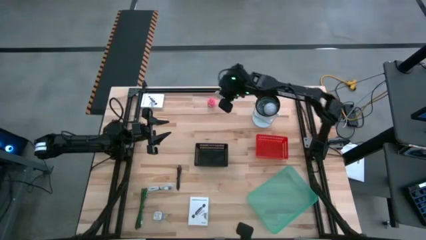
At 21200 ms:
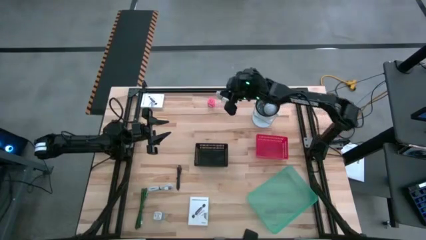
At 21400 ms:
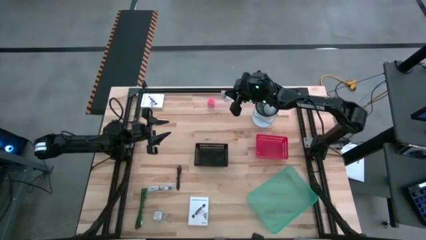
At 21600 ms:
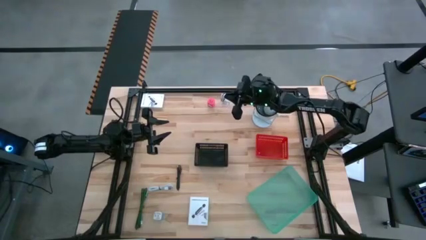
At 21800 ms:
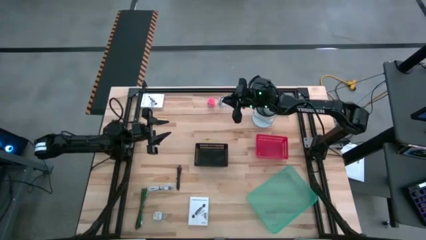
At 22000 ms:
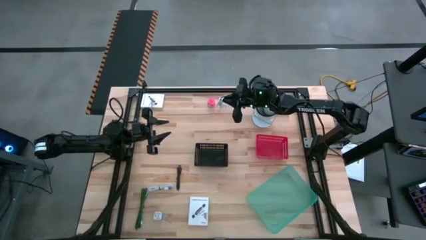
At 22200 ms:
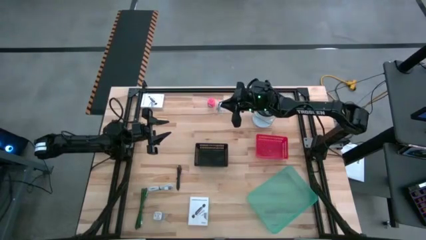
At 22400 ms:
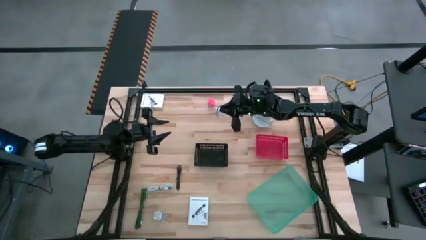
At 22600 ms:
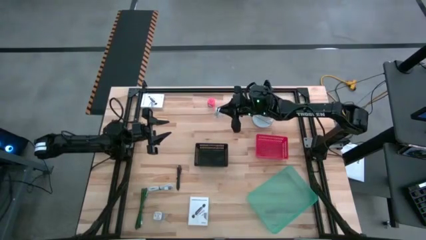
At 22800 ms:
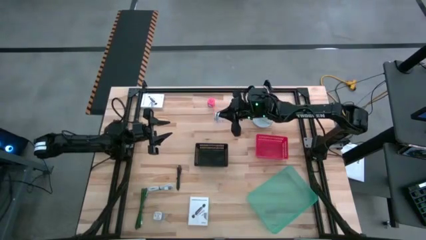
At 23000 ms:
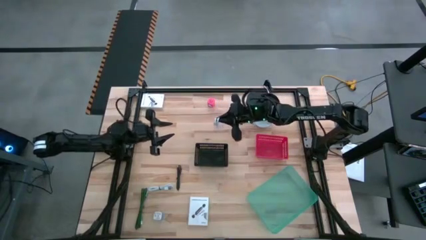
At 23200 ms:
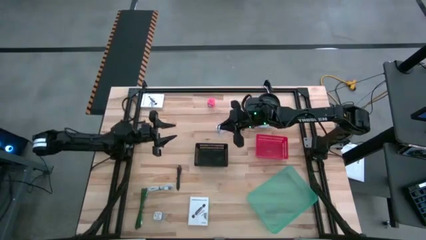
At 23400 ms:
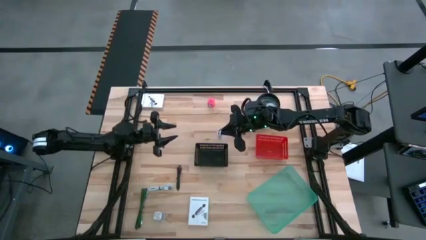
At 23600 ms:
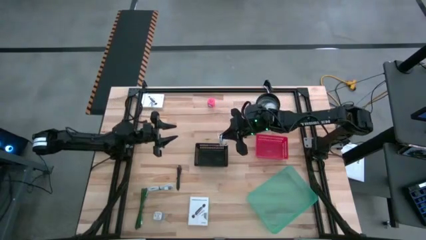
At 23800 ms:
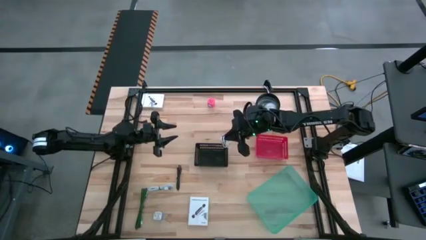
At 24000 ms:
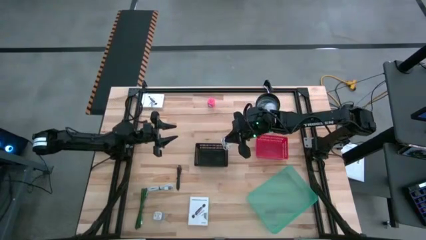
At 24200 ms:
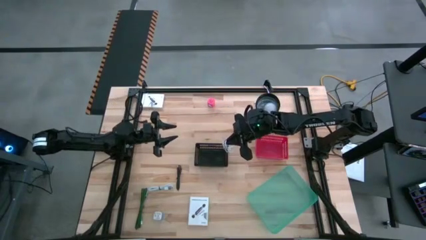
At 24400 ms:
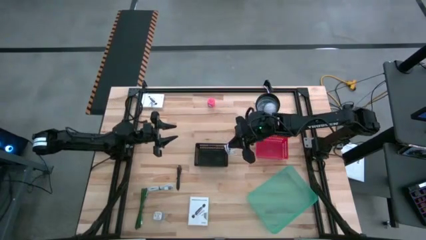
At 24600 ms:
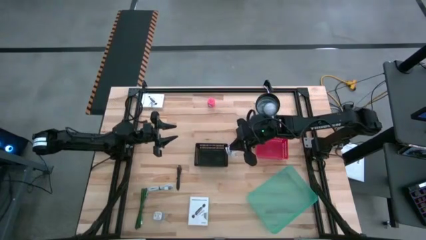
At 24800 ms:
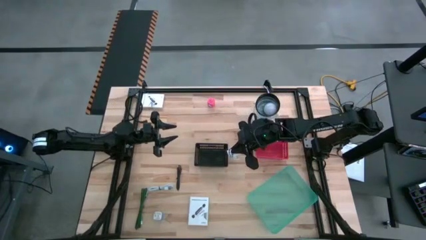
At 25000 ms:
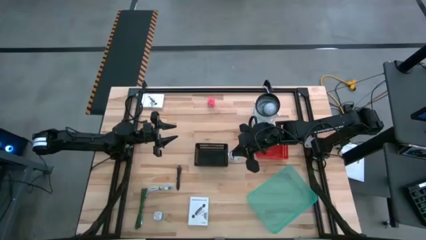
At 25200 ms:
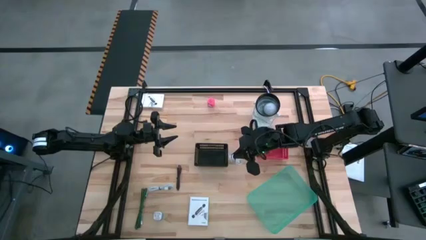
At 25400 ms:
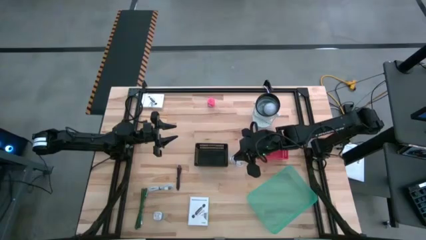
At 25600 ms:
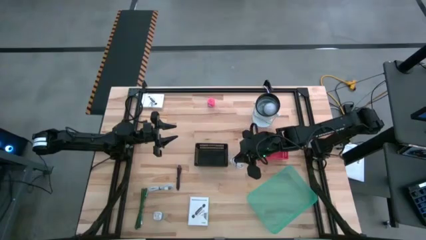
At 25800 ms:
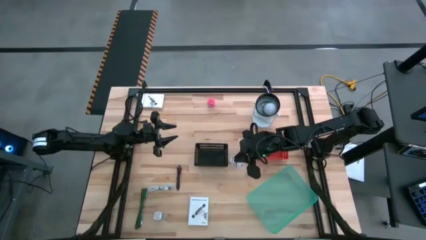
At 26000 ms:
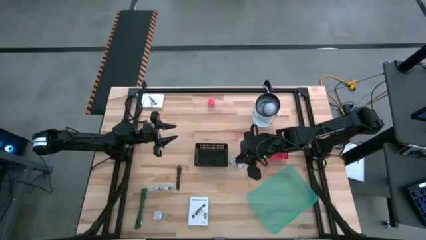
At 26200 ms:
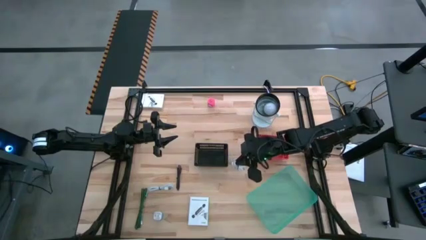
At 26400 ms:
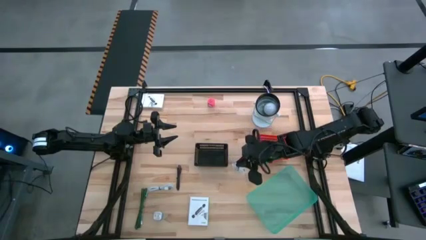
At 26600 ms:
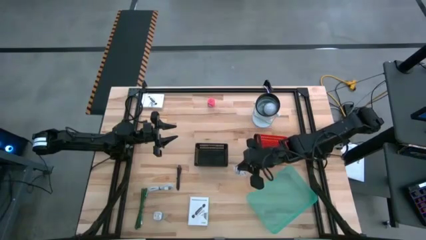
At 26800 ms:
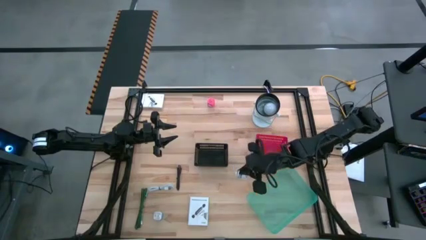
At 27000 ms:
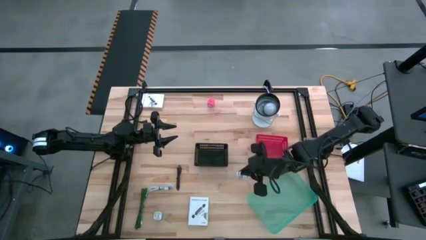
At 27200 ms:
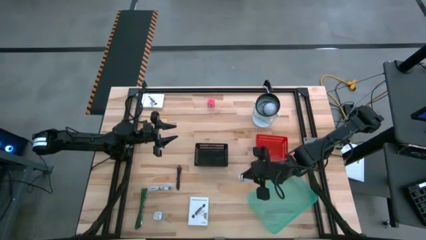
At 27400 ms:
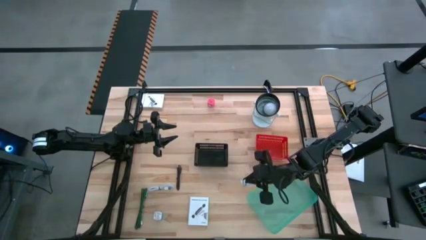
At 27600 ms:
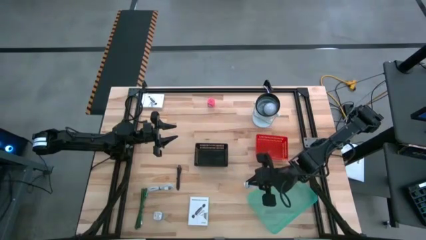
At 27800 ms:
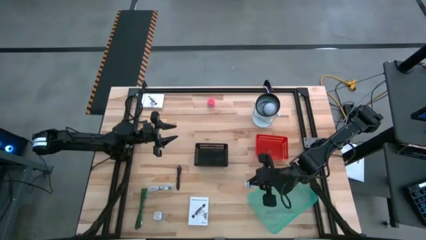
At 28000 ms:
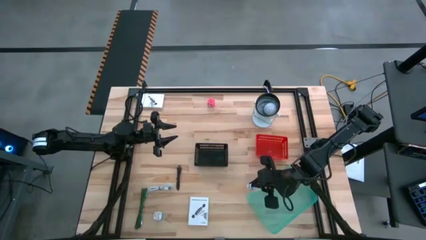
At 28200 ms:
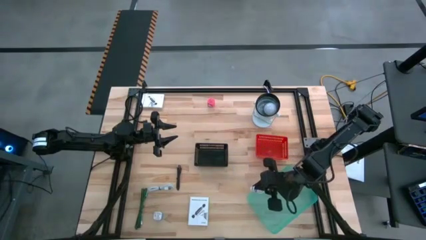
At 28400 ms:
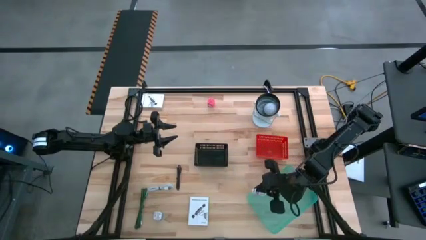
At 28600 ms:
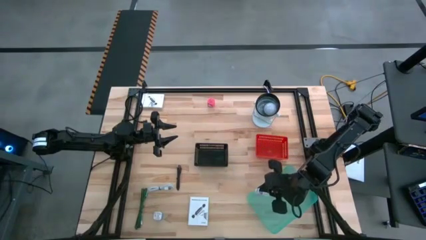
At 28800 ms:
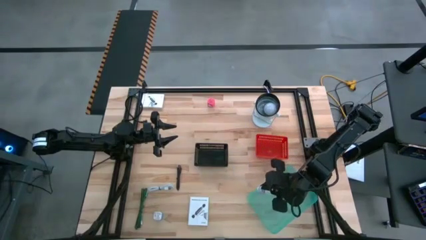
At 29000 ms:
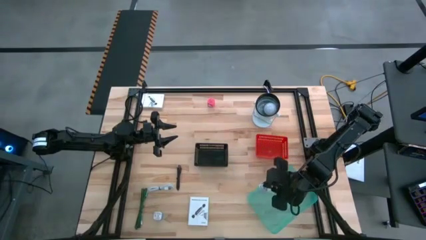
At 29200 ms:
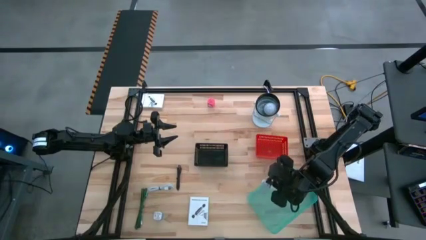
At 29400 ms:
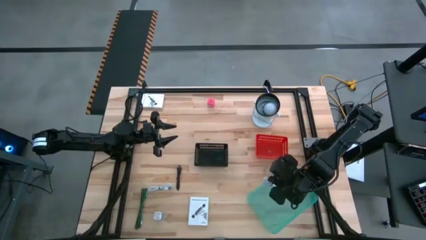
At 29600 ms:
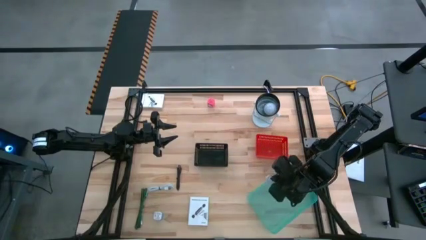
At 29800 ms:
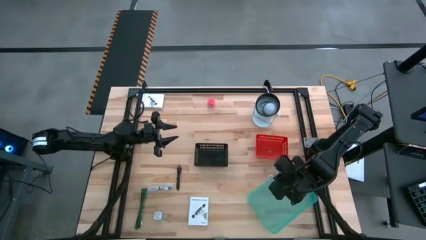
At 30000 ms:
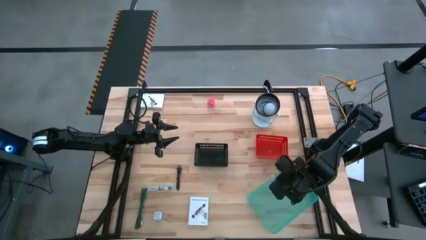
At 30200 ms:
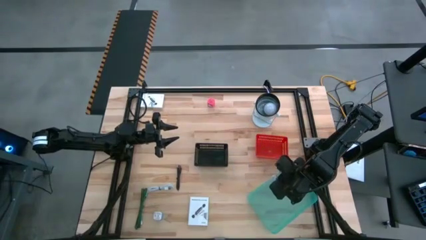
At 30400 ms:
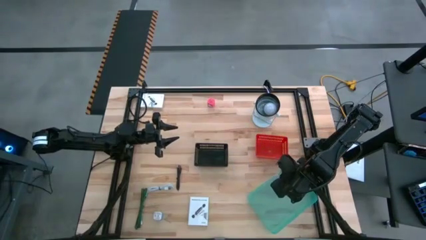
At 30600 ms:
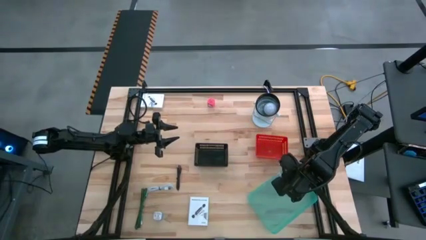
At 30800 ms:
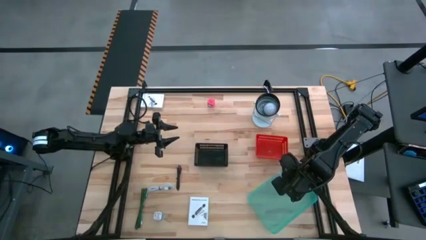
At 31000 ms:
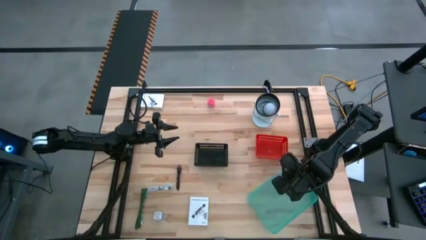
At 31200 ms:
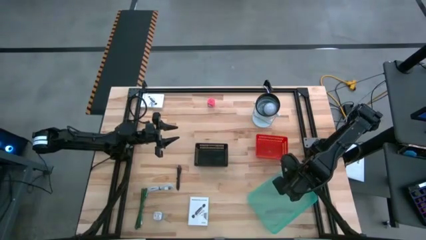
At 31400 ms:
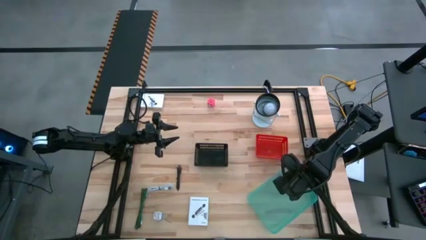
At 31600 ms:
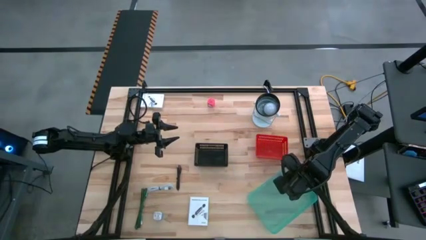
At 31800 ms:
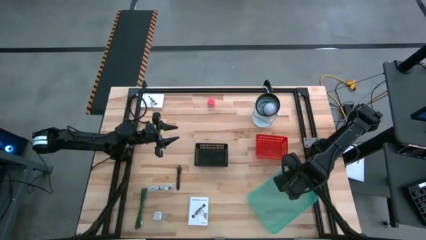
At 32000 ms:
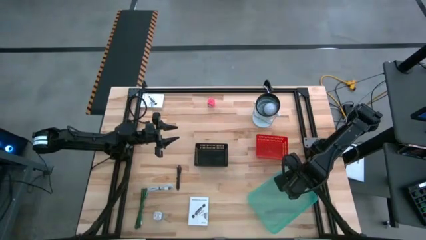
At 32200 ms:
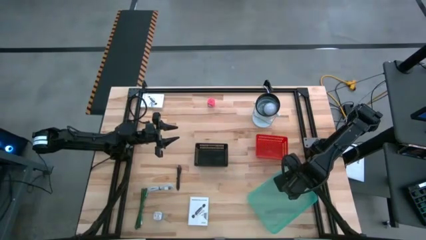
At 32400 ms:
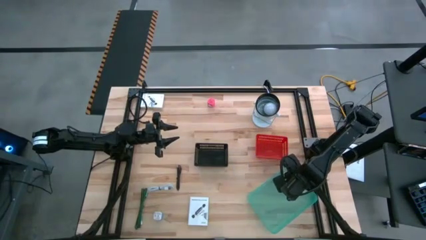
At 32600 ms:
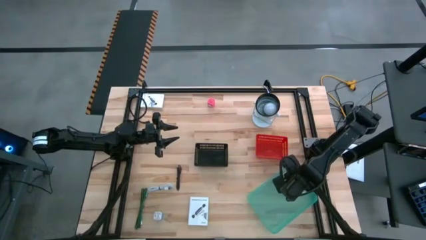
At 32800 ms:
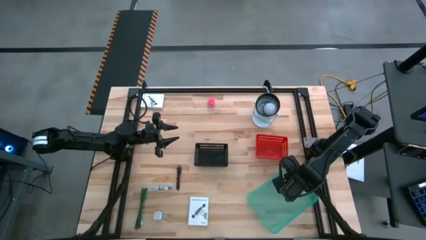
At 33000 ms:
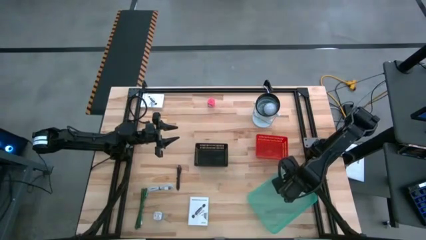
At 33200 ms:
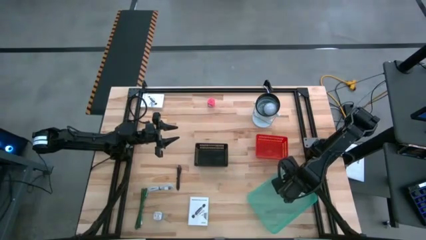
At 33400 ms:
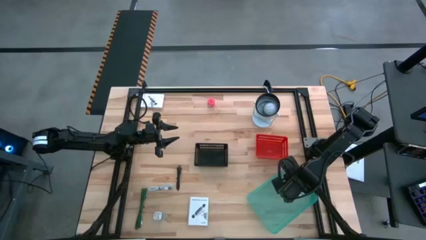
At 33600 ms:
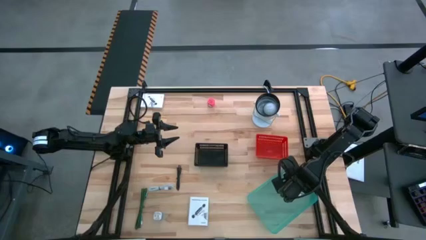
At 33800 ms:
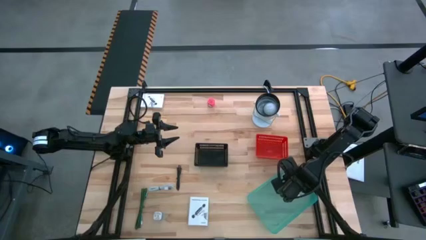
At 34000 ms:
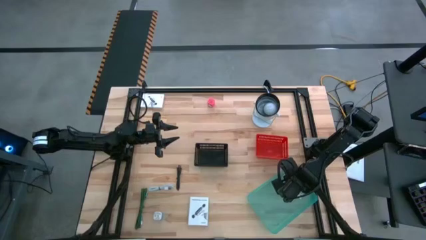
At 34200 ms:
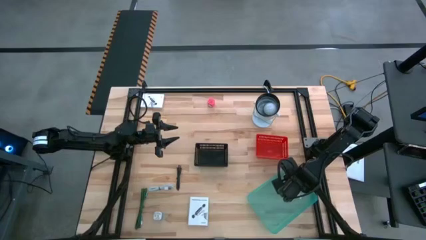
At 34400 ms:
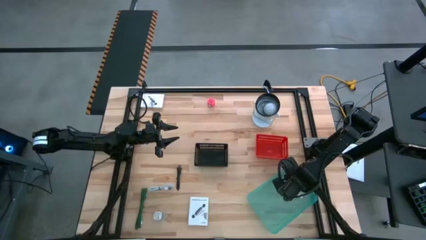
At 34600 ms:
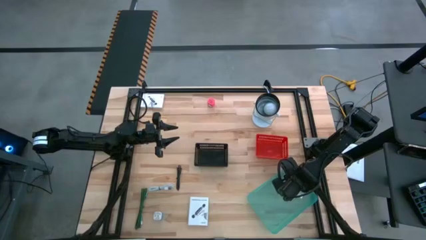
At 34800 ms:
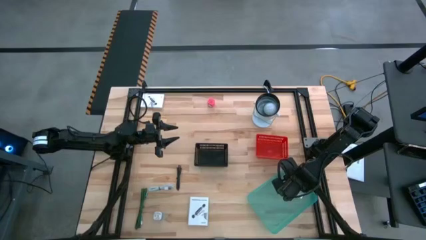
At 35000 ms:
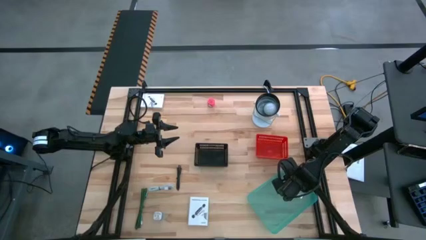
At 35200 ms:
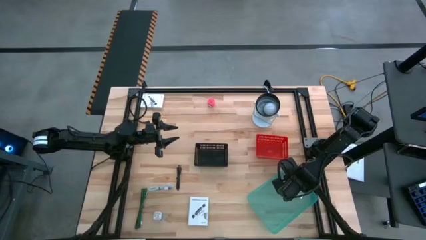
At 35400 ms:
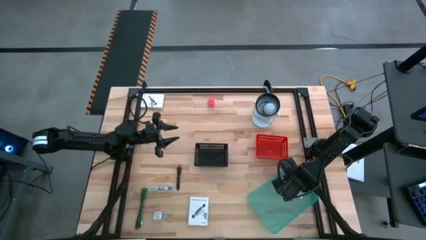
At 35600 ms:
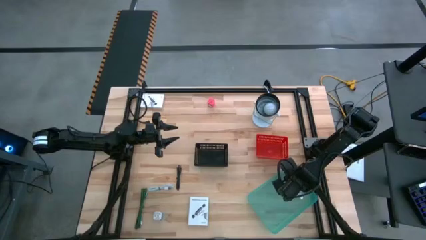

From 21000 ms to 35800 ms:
Task: Pick and place items into bin
Put the top white charger cable into the blue bin

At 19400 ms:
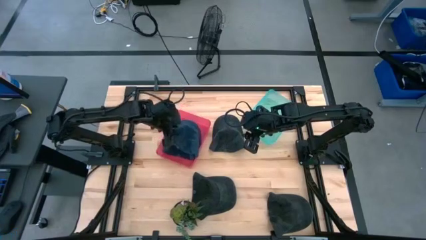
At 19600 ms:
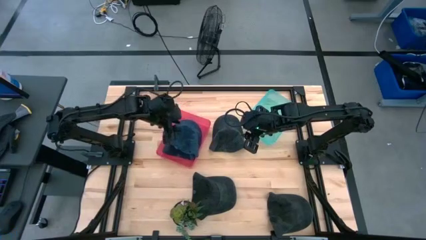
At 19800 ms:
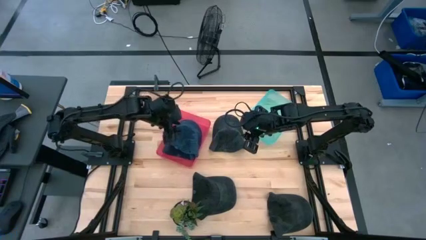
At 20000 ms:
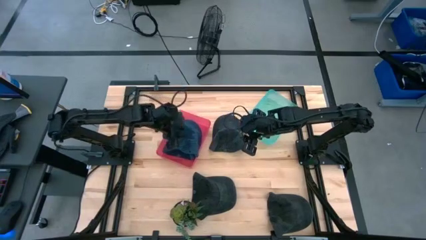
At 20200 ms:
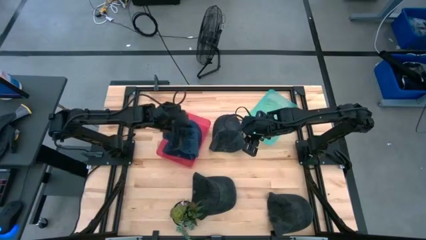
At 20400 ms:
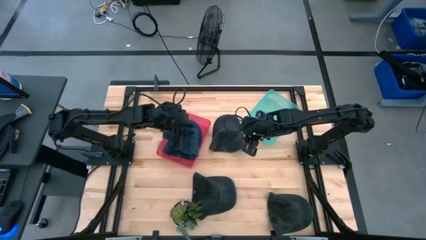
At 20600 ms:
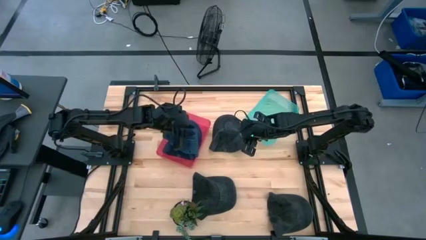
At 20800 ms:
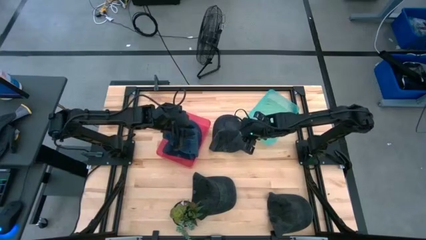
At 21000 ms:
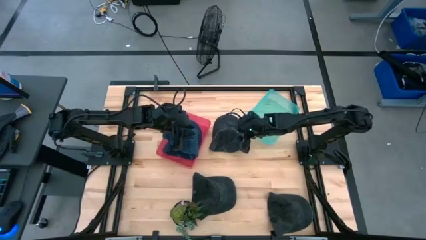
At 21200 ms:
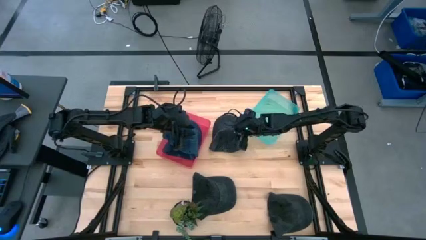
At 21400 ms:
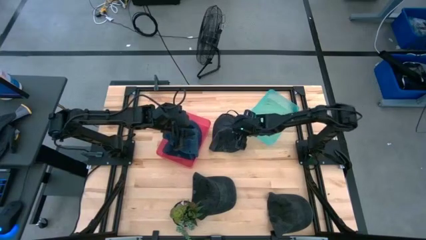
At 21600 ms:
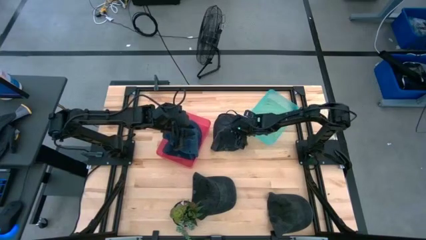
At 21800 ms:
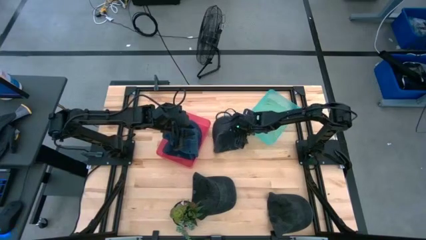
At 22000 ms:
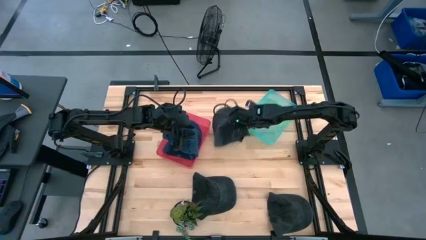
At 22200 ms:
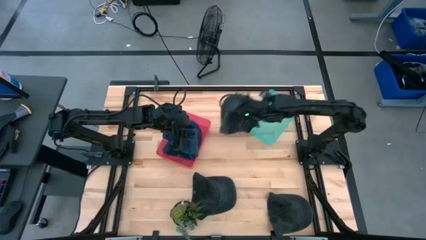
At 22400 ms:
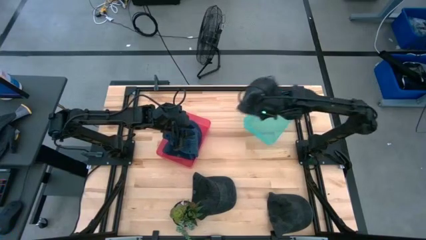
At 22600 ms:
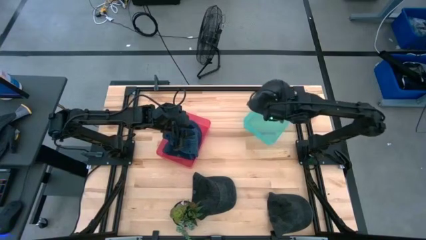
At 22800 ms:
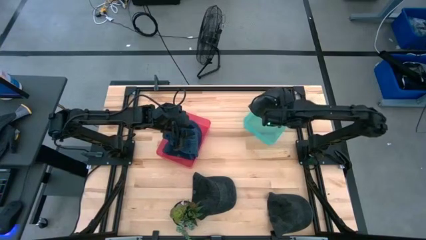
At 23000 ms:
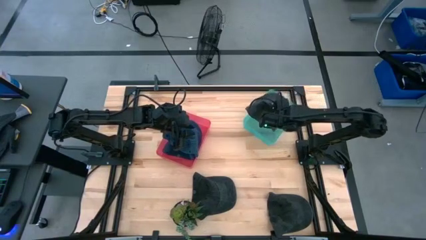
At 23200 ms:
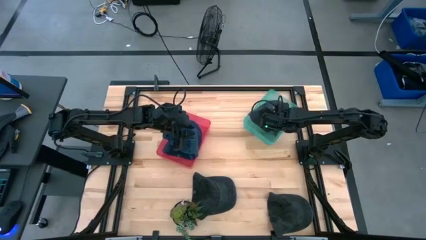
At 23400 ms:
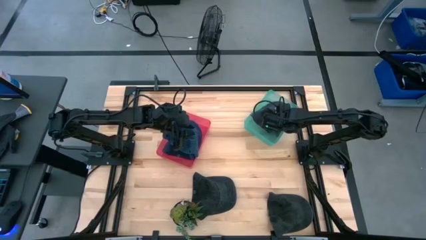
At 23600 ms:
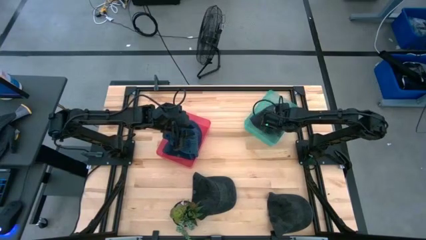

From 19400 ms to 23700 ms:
Task: Pick & Place hat
Put the top black cap into the green bin
